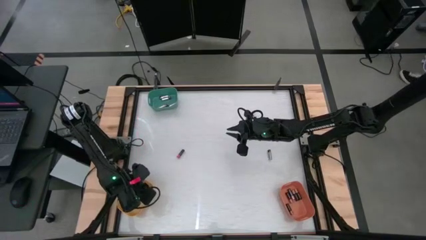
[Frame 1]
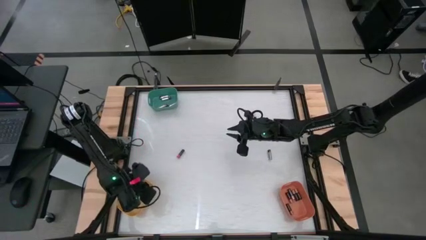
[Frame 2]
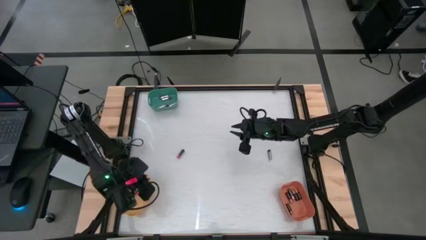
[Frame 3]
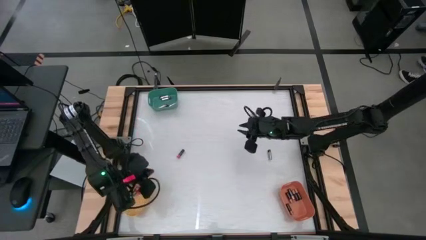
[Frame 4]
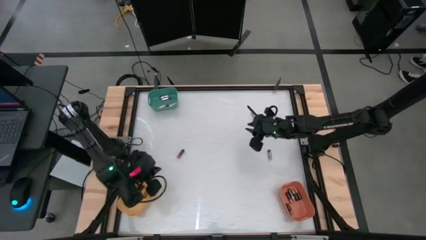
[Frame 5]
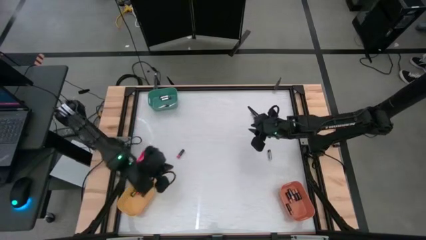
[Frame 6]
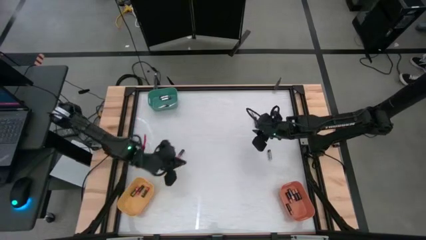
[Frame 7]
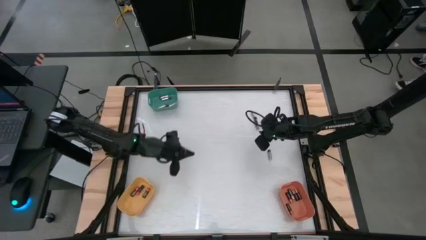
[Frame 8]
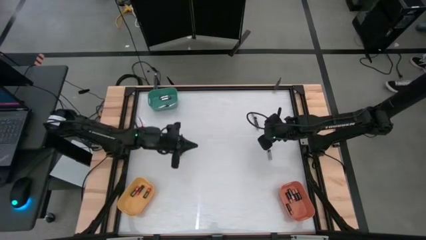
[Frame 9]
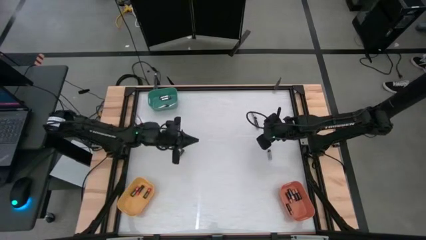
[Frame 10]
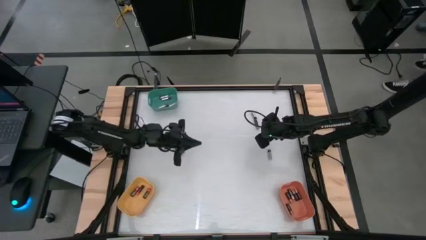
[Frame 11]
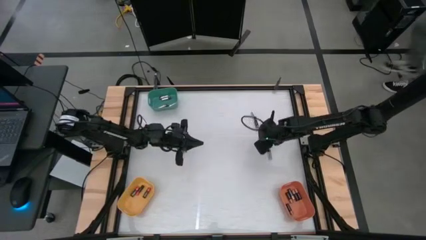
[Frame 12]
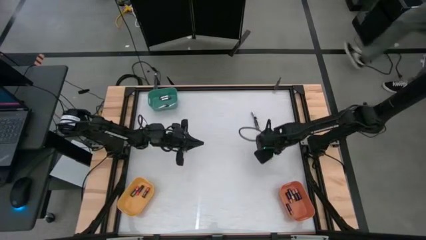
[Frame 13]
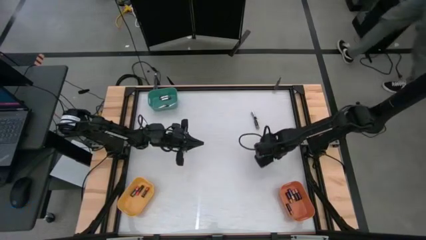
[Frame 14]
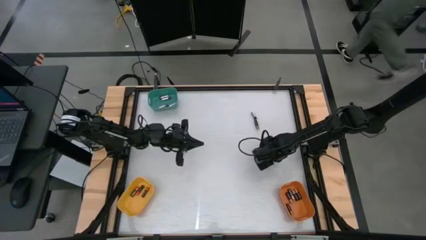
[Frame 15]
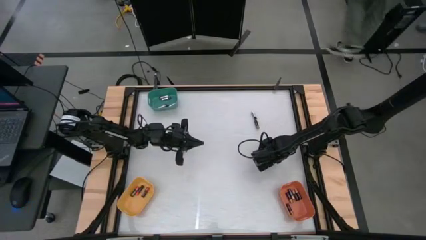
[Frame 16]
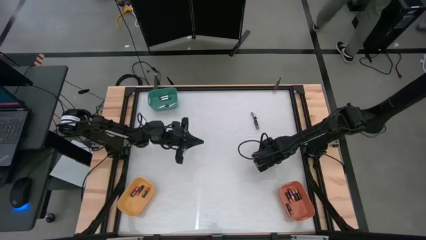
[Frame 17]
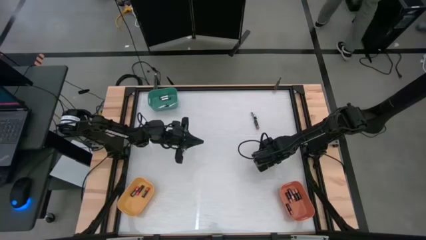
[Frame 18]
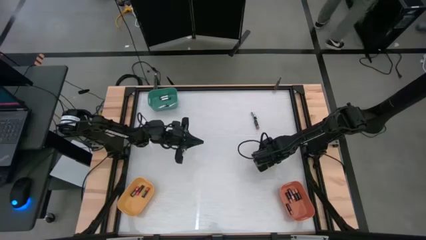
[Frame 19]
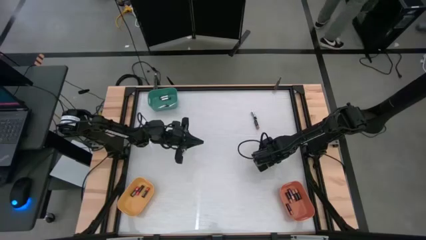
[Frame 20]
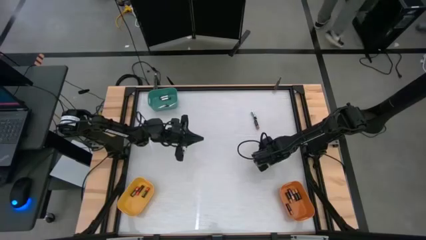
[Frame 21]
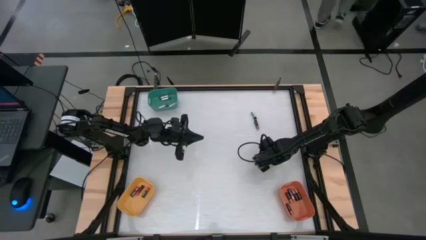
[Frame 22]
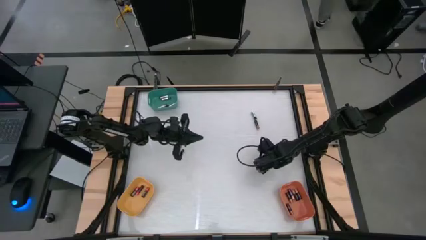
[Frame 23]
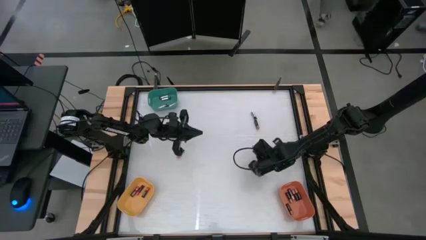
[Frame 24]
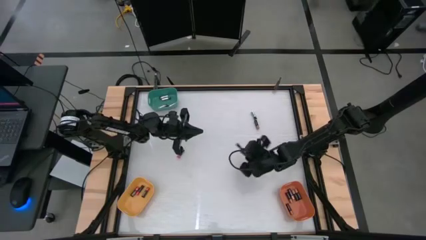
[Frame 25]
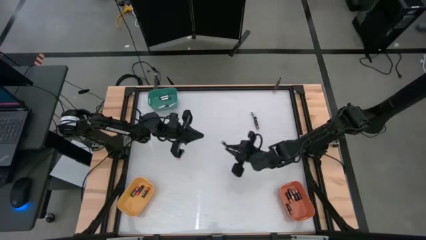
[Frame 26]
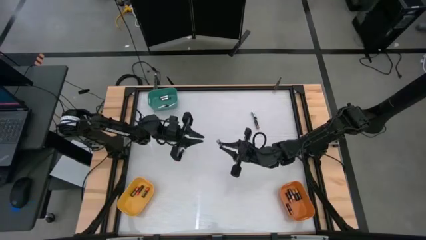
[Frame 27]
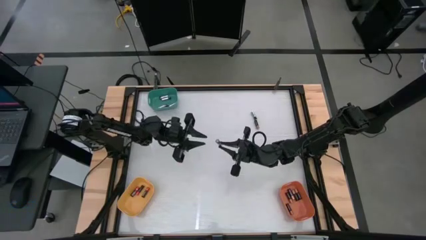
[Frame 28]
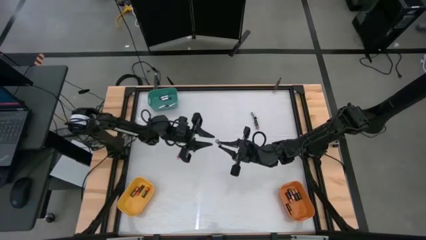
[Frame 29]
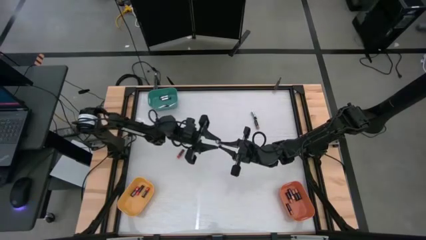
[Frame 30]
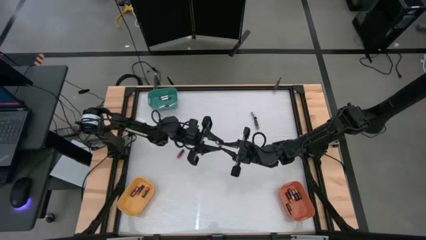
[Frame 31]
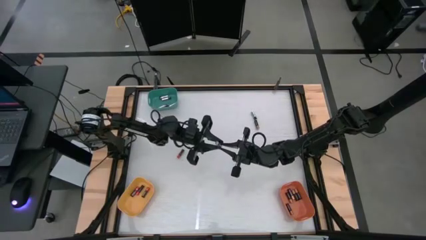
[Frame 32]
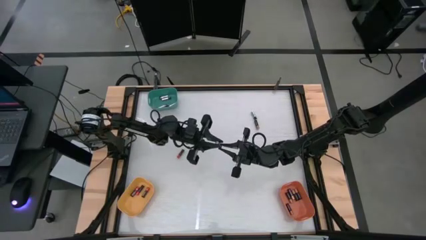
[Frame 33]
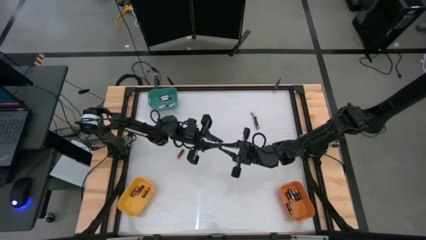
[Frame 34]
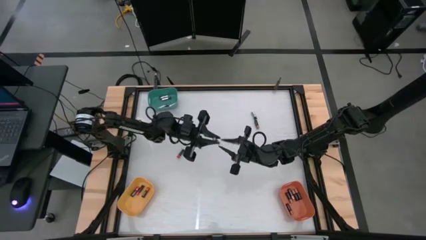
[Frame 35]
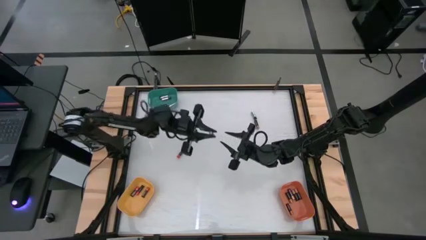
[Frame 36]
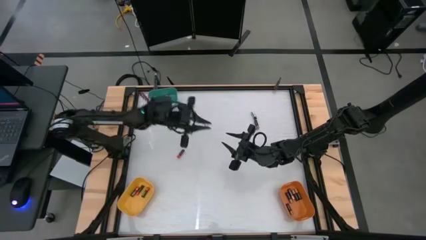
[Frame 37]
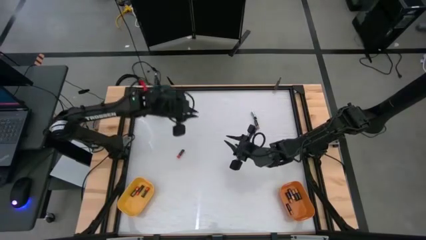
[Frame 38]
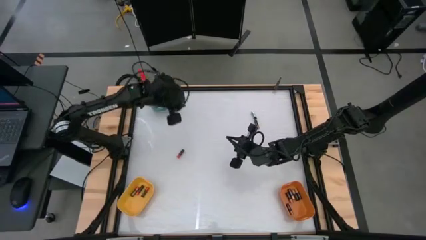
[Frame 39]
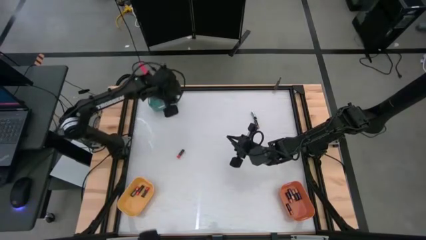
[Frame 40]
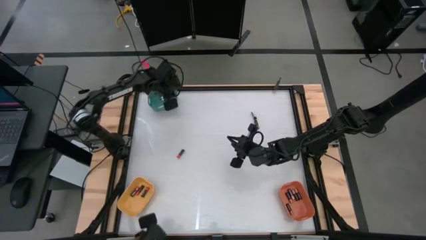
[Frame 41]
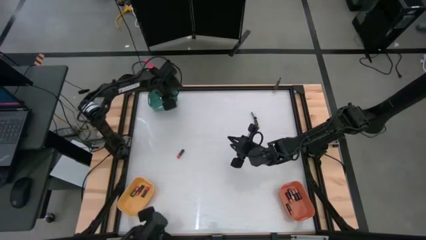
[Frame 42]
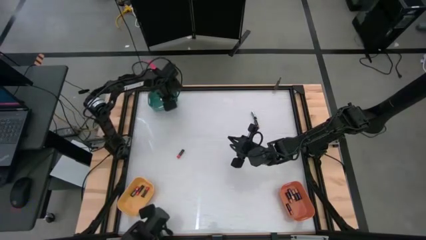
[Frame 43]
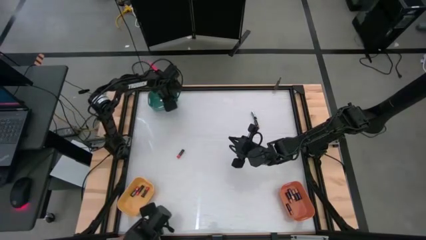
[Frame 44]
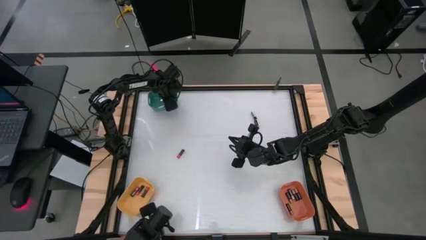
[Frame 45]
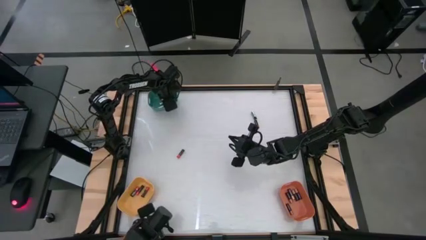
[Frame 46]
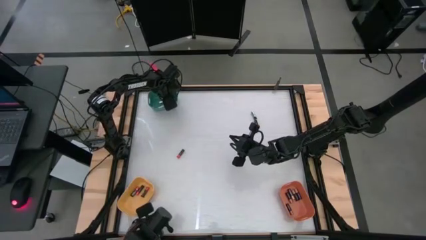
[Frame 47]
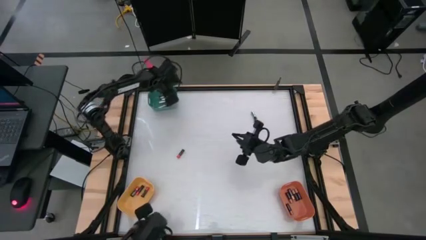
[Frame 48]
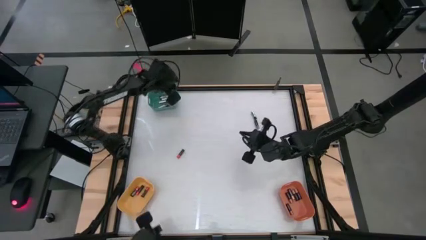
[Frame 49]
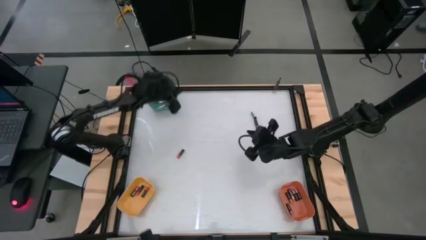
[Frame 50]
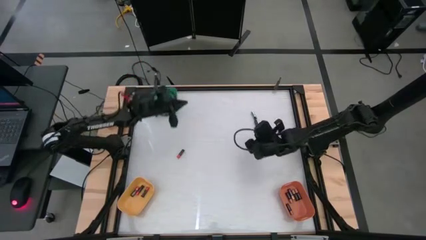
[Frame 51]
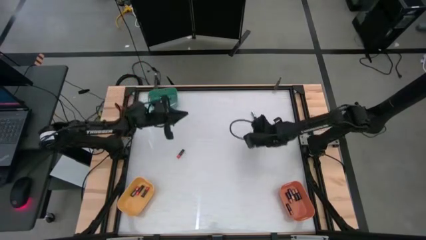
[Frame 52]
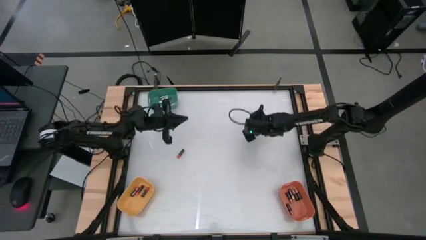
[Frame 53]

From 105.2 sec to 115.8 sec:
Task: Sort batteries
Put the silver battery into the blue bin

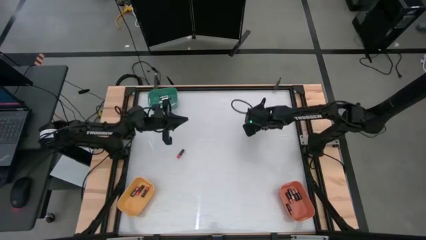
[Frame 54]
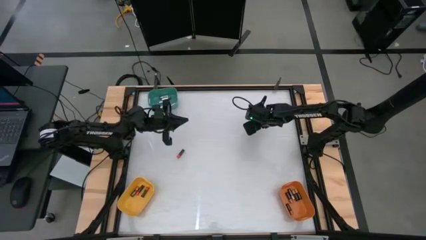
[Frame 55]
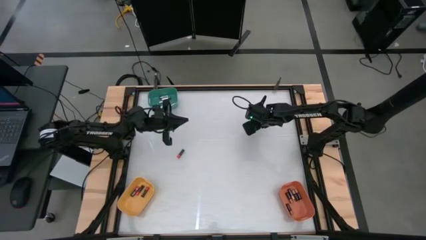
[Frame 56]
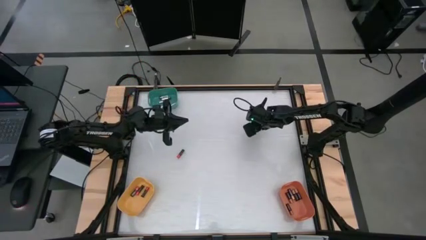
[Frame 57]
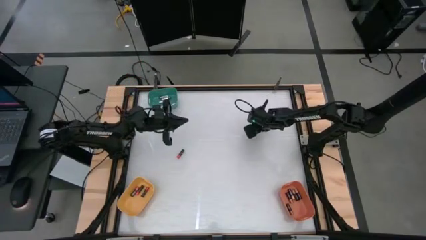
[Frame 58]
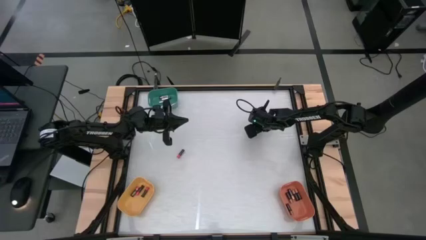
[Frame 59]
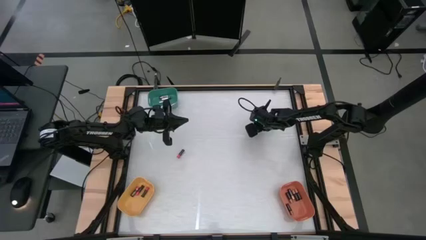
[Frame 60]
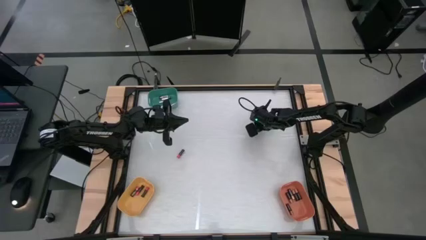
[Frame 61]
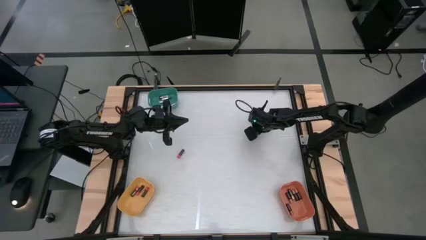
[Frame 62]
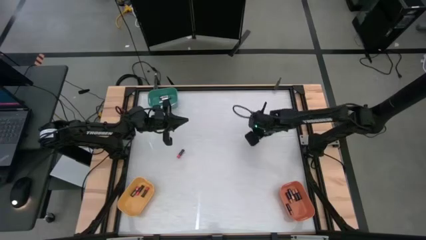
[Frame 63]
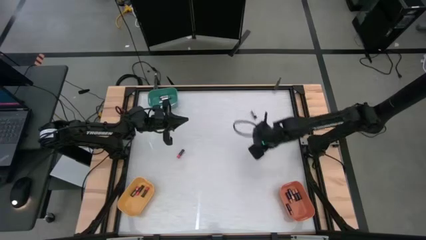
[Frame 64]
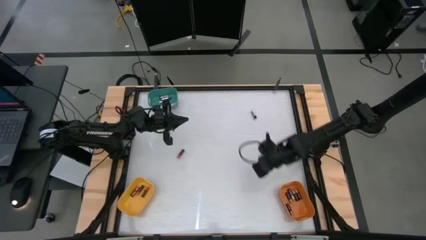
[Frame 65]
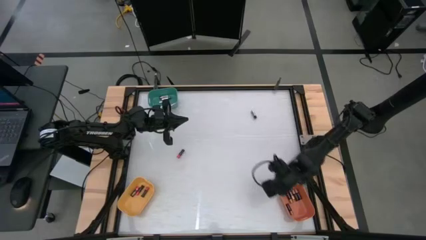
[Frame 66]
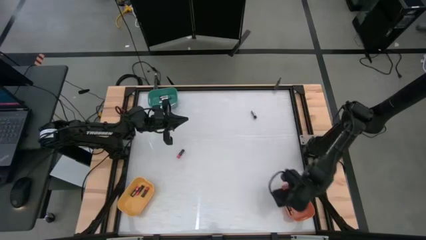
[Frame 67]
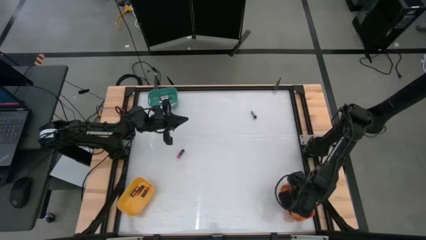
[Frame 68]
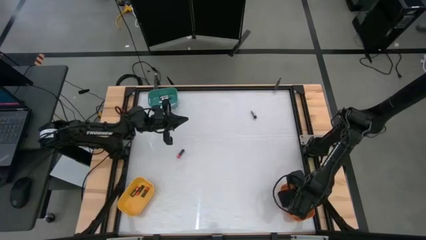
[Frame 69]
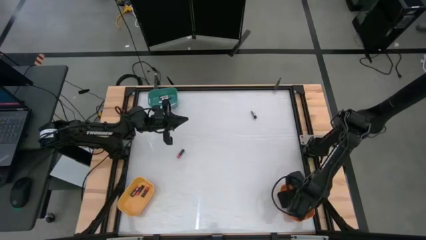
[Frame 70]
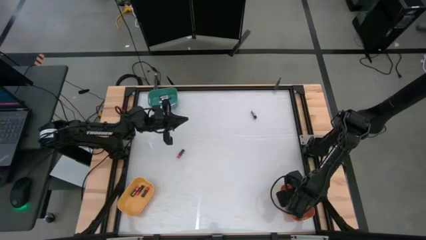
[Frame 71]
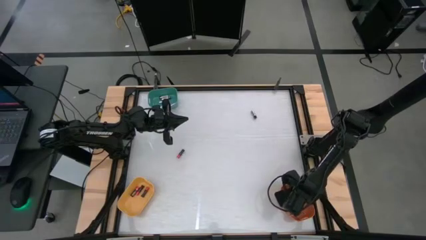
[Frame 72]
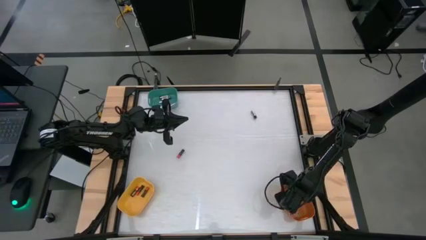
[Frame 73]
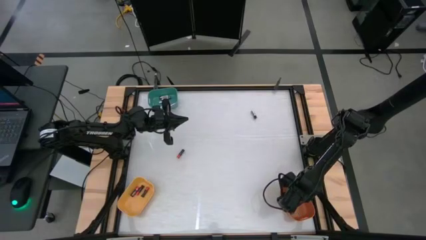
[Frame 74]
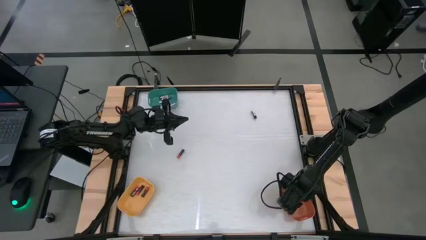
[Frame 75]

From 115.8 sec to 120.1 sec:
Put the gold battery into the orange bin
